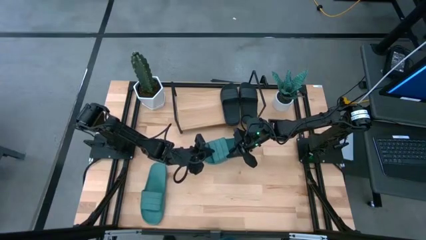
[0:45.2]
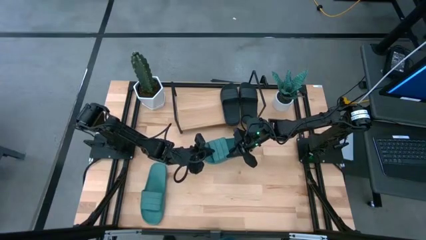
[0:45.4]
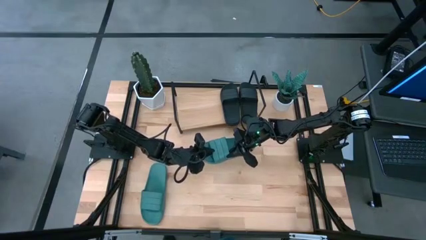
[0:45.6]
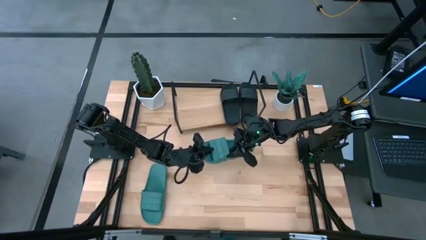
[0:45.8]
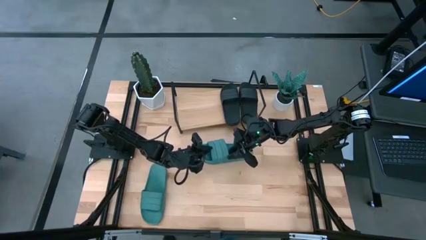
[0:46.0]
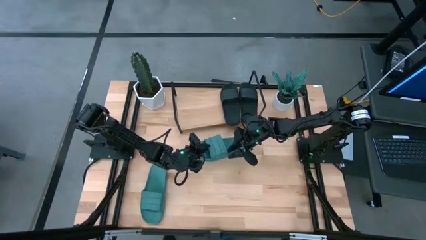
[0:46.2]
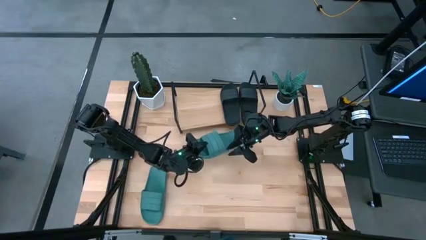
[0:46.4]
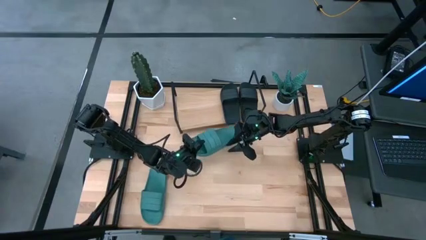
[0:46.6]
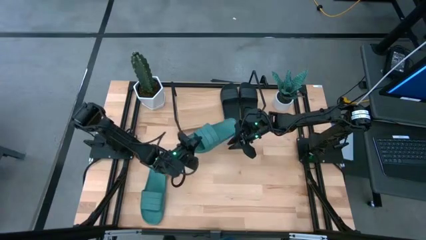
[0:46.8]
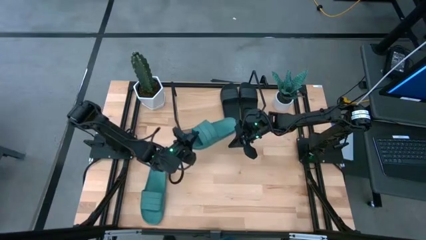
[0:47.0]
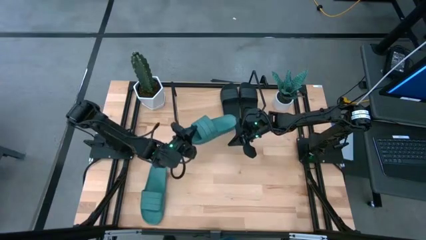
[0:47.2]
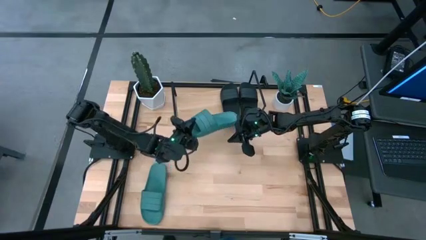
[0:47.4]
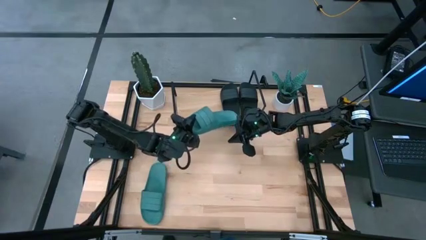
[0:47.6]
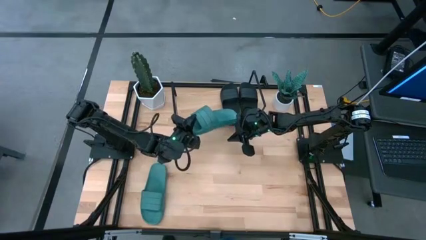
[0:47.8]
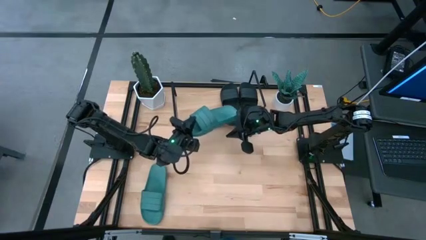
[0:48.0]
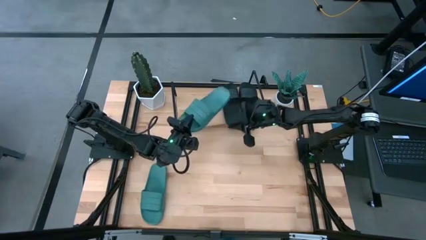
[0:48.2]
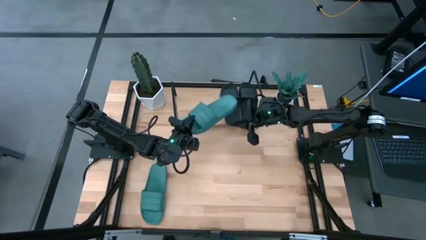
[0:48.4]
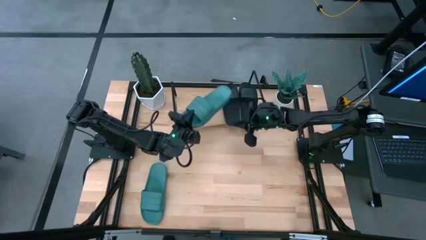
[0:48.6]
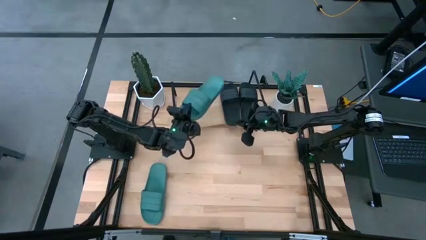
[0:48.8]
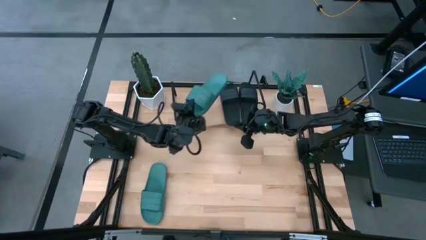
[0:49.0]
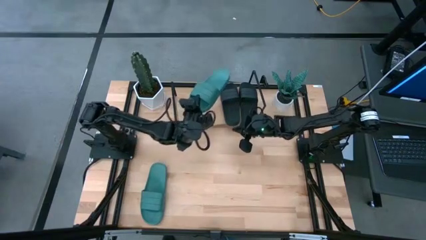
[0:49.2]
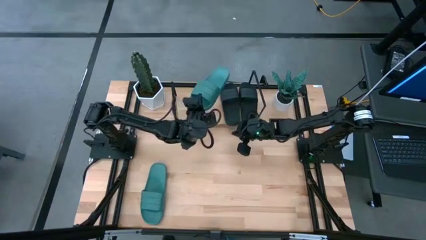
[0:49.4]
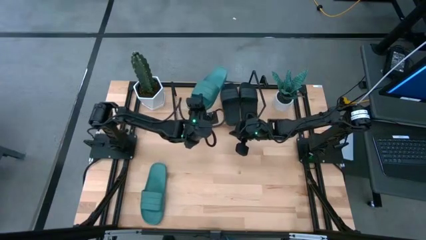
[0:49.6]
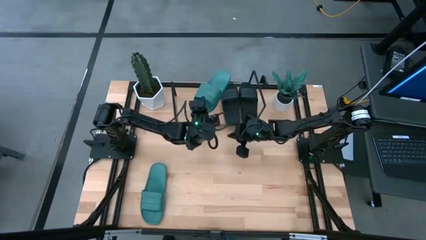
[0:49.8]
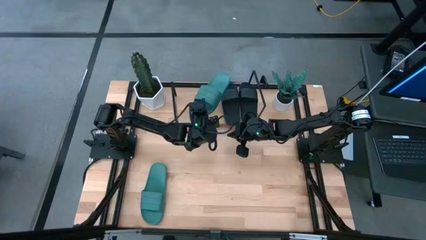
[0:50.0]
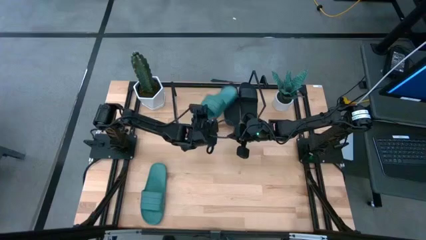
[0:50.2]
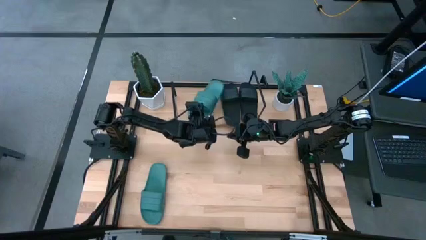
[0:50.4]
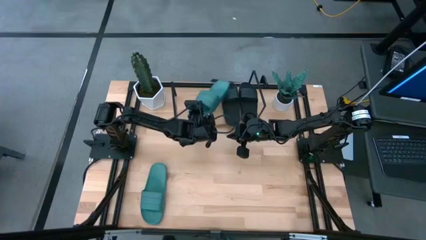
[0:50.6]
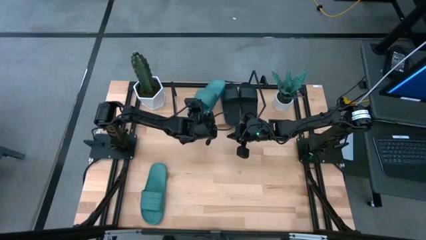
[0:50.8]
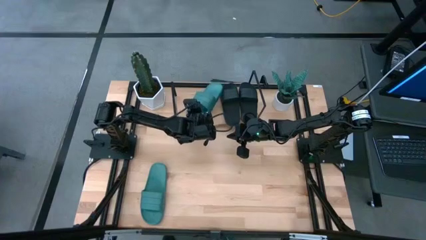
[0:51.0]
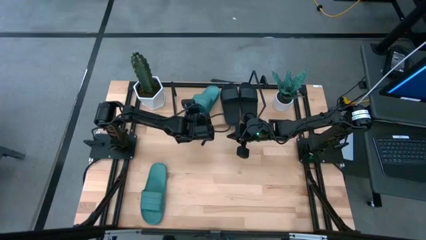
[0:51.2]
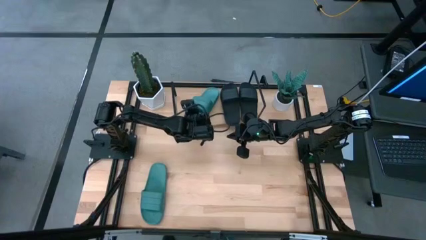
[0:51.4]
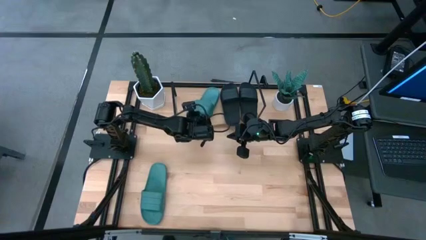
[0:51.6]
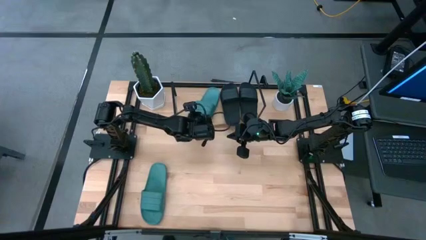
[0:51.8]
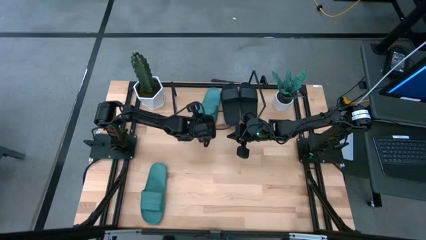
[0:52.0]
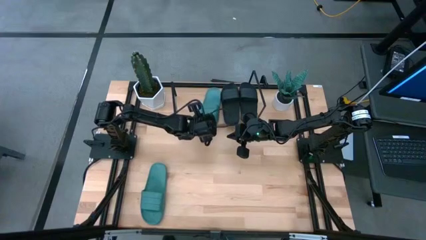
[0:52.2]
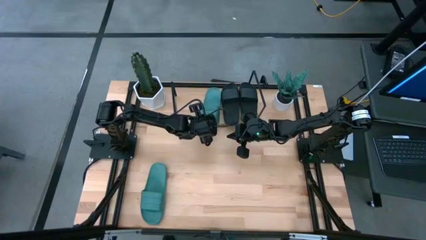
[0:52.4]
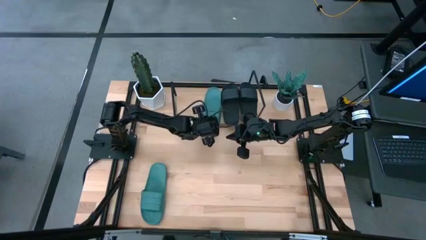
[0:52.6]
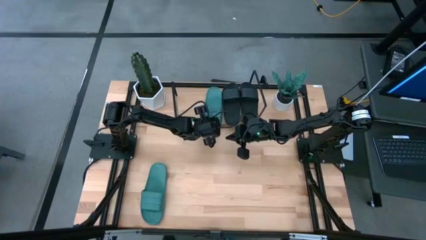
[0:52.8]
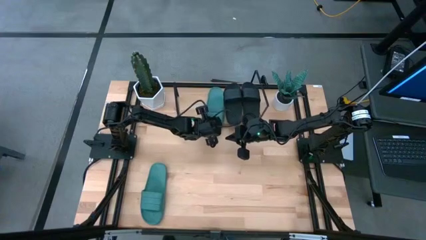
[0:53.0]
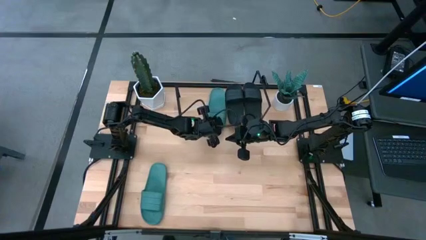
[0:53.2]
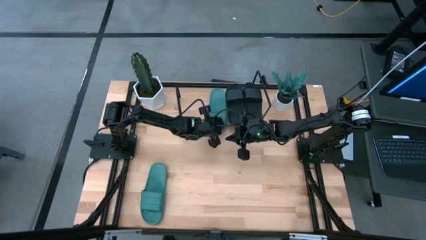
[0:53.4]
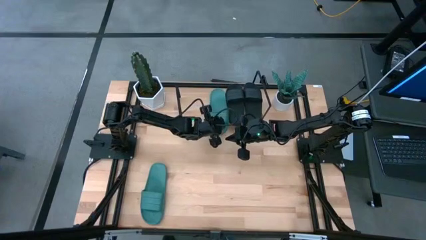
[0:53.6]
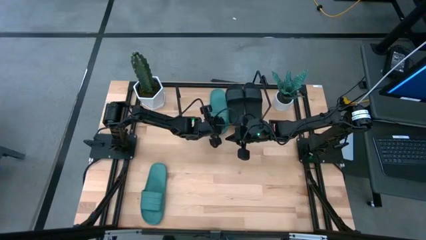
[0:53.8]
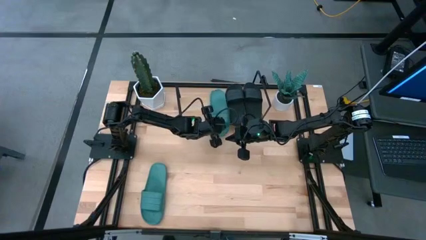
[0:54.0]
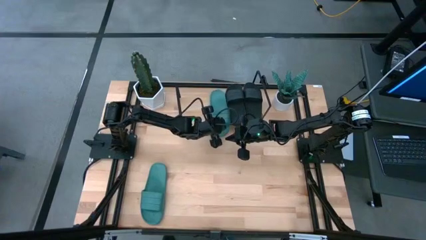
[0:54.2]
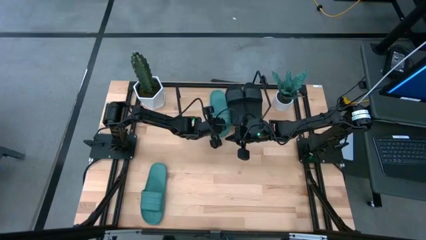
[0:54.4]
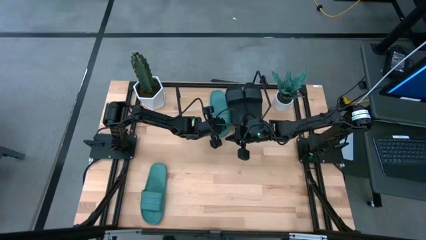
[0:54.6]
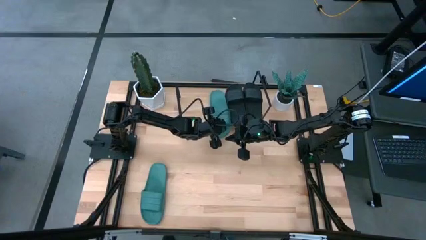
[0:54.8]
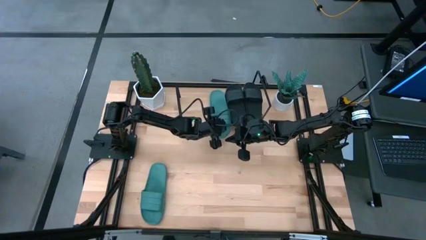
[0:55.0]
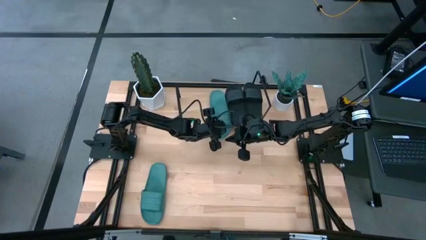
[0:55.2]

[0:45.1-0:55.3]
Task: Pick and place slides into the shelf
Put the top dark green slide on the shelf
